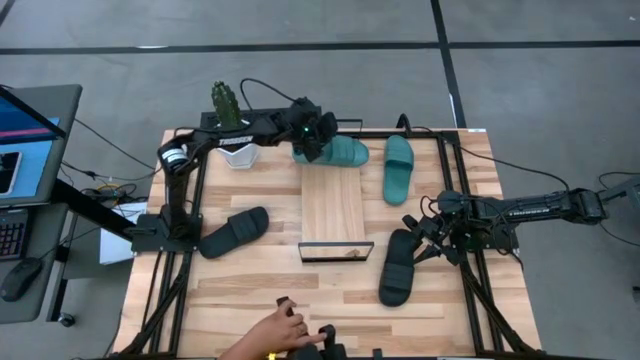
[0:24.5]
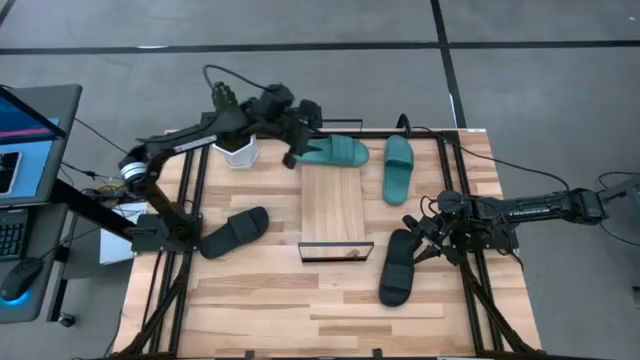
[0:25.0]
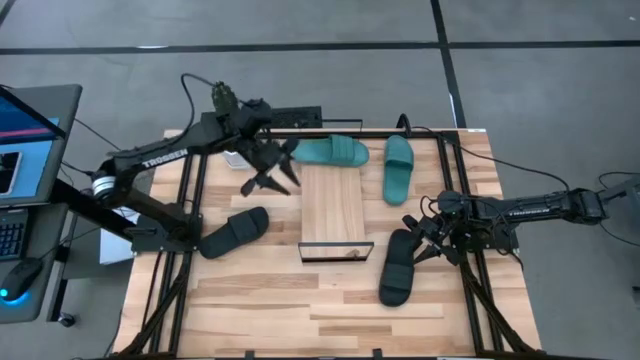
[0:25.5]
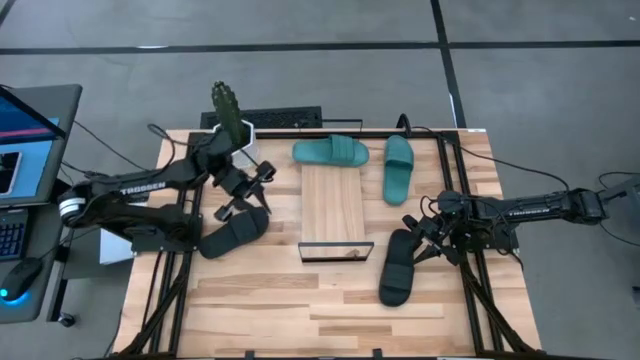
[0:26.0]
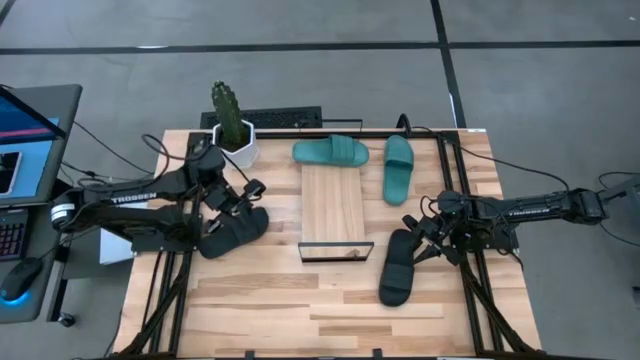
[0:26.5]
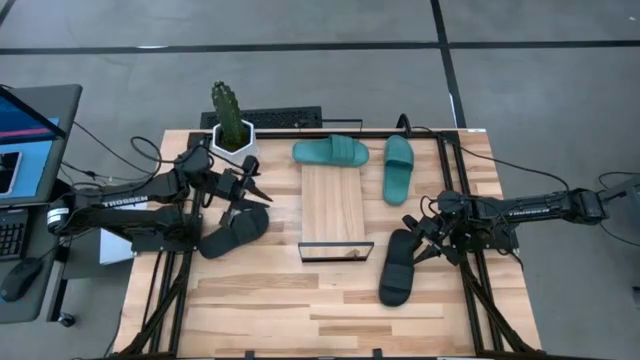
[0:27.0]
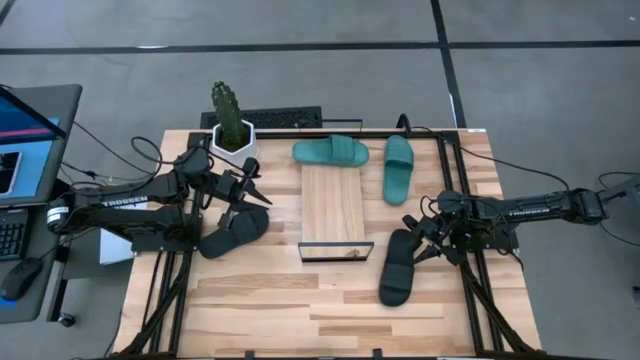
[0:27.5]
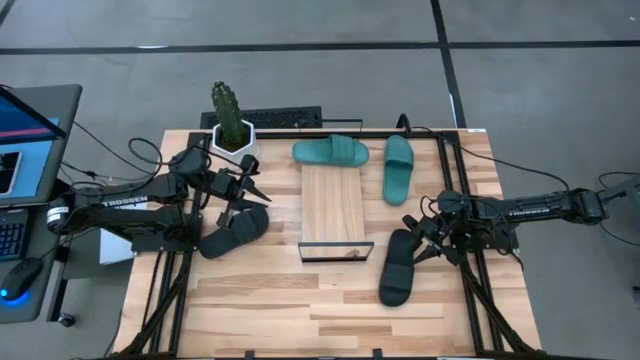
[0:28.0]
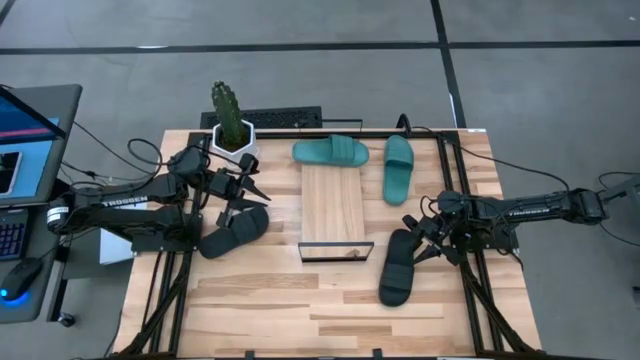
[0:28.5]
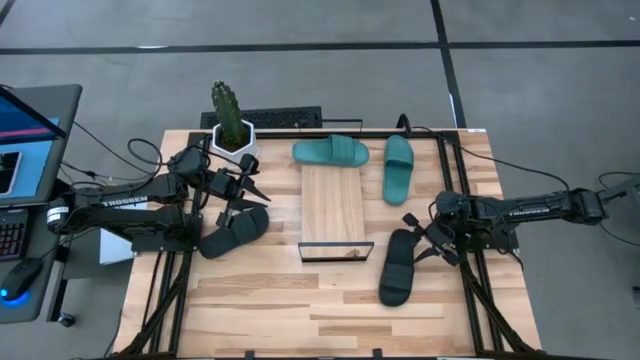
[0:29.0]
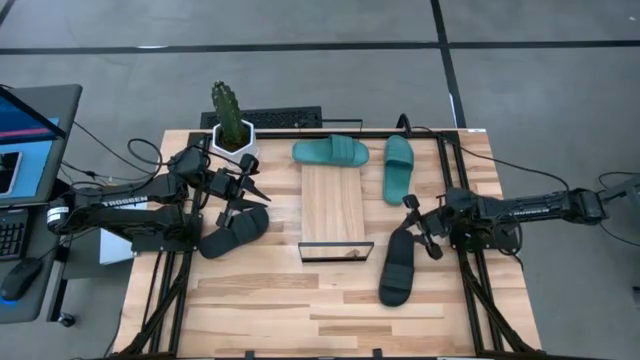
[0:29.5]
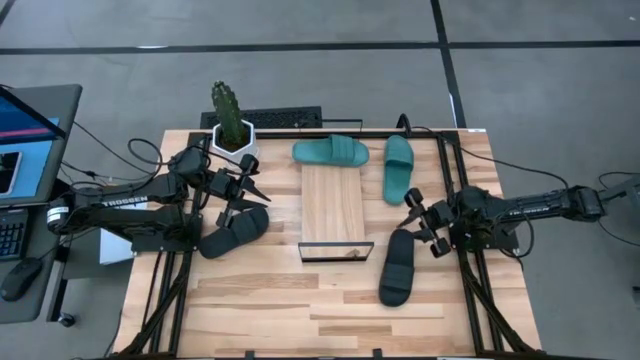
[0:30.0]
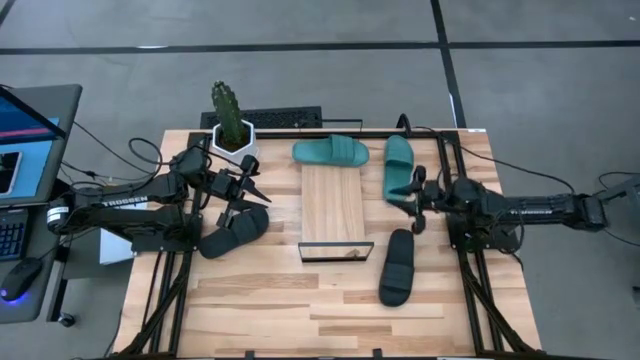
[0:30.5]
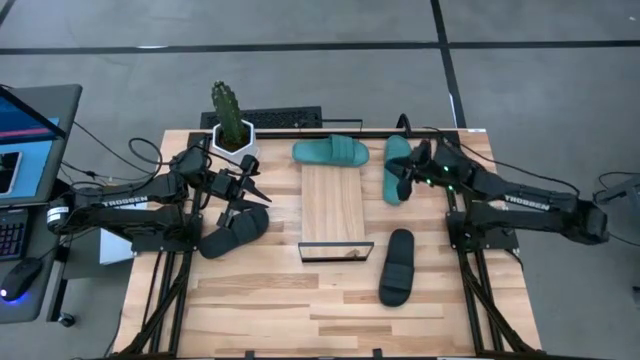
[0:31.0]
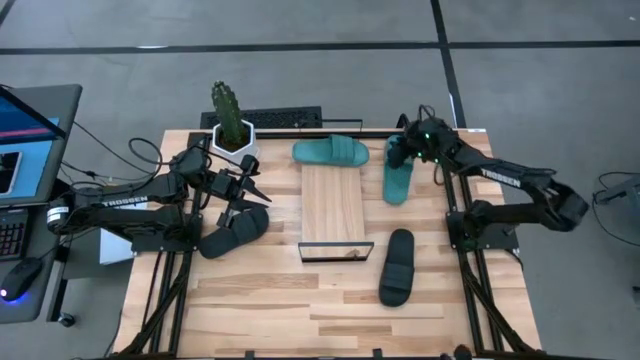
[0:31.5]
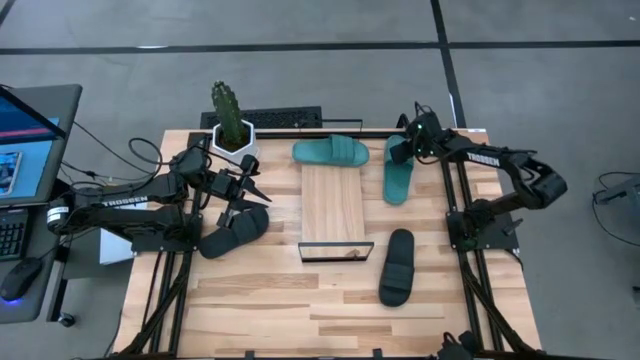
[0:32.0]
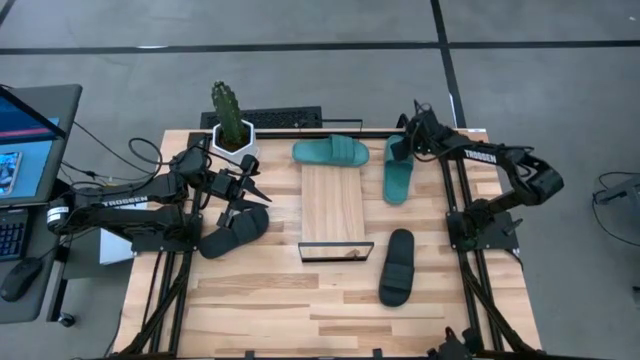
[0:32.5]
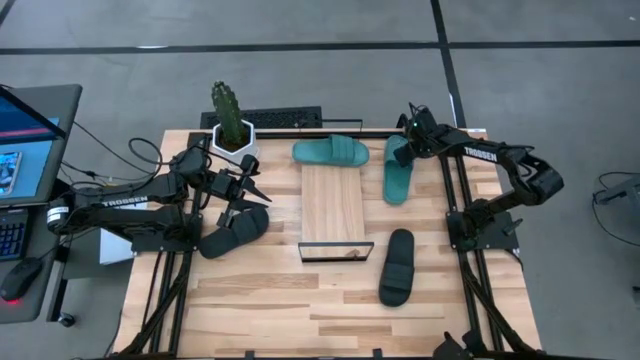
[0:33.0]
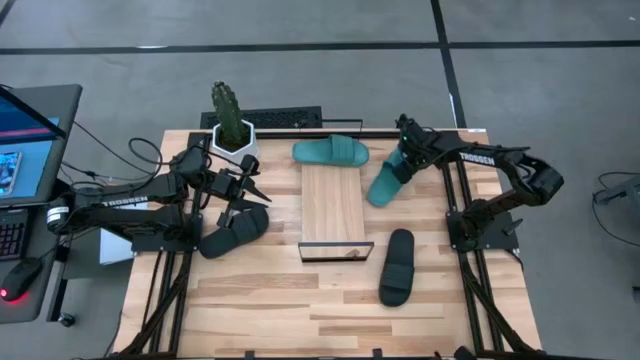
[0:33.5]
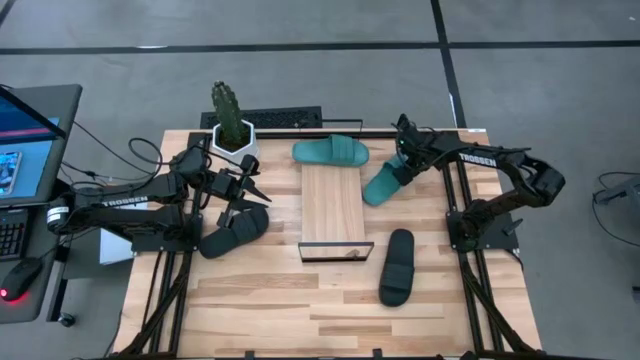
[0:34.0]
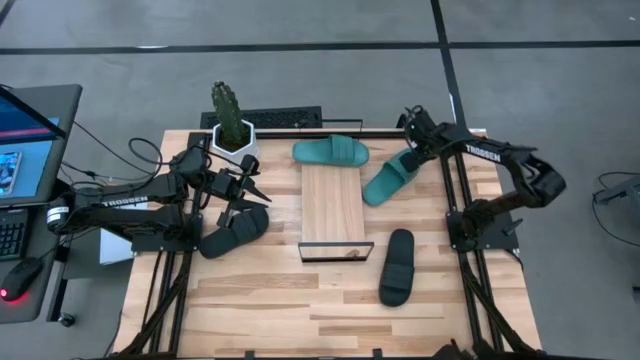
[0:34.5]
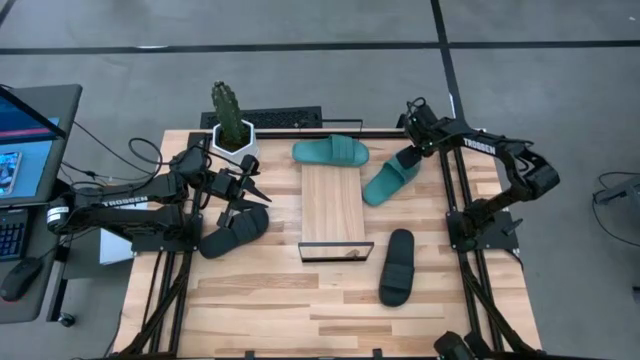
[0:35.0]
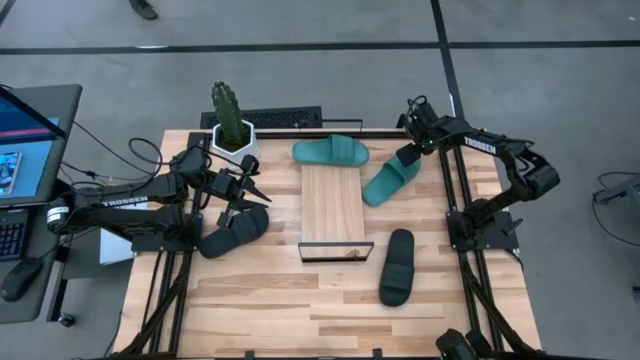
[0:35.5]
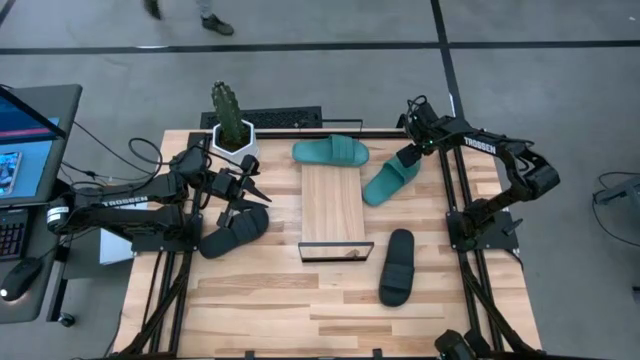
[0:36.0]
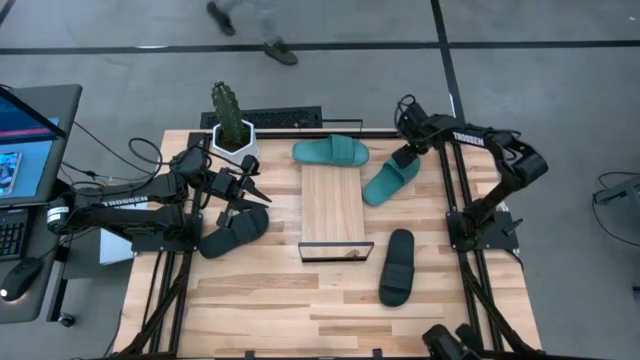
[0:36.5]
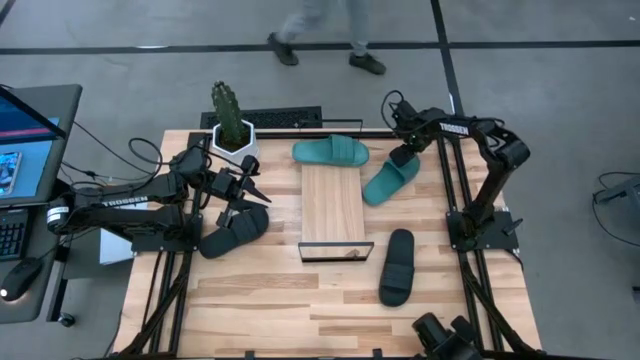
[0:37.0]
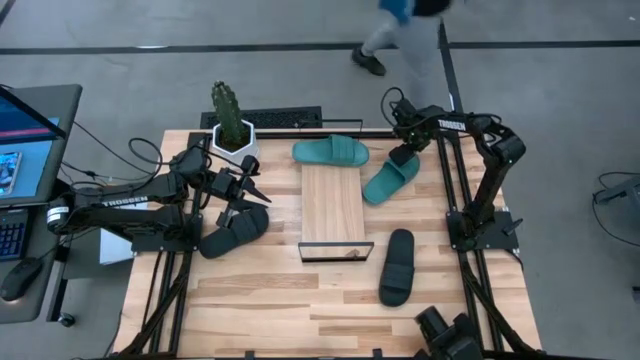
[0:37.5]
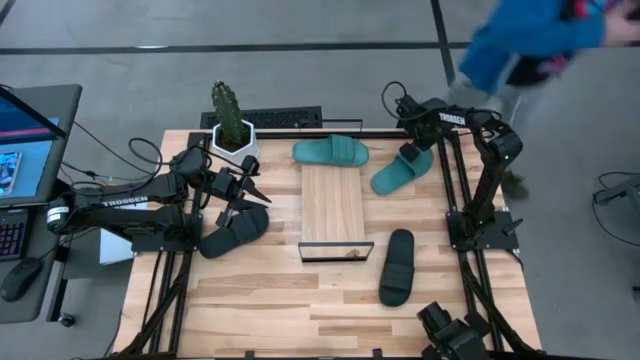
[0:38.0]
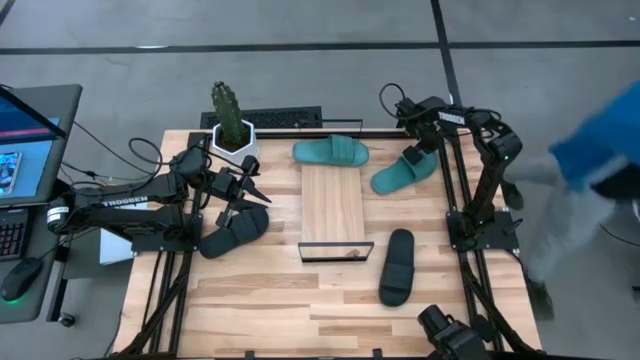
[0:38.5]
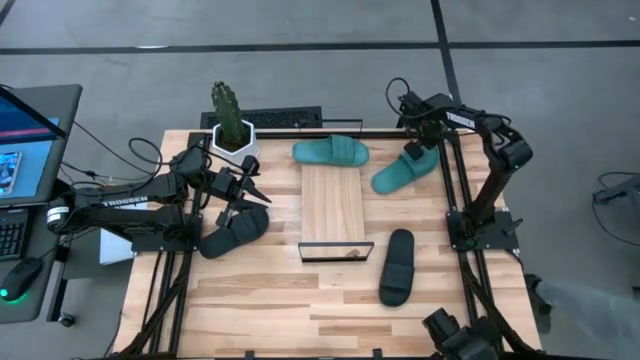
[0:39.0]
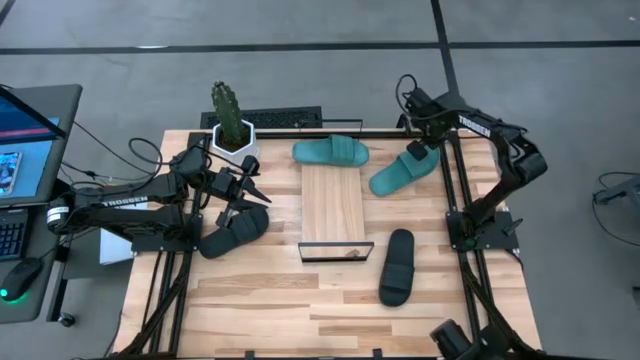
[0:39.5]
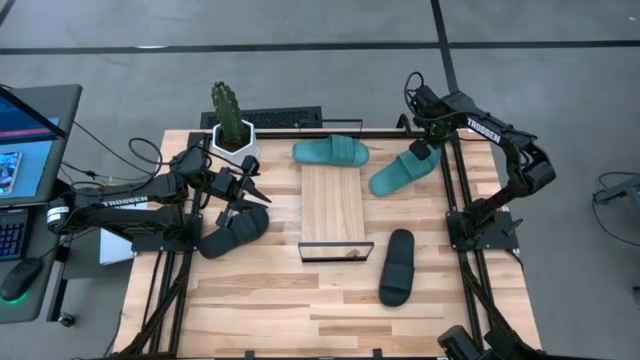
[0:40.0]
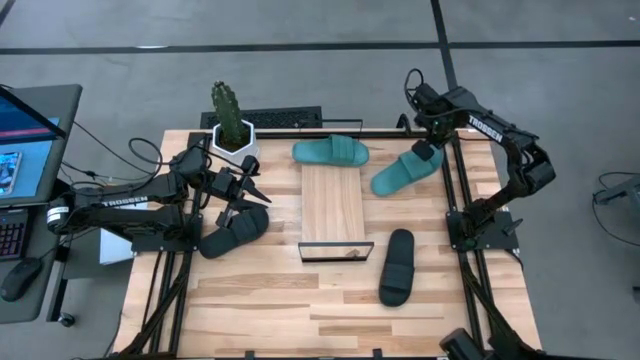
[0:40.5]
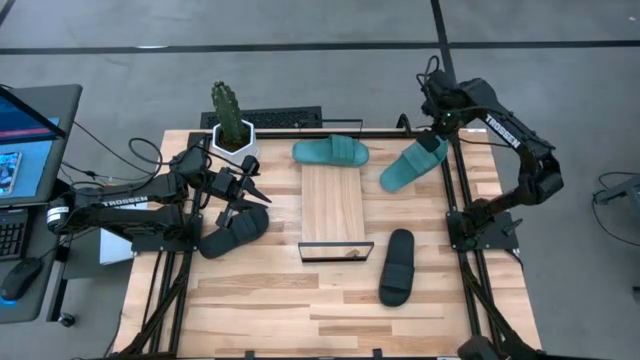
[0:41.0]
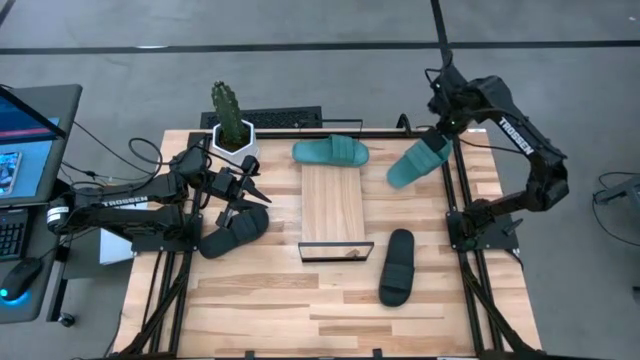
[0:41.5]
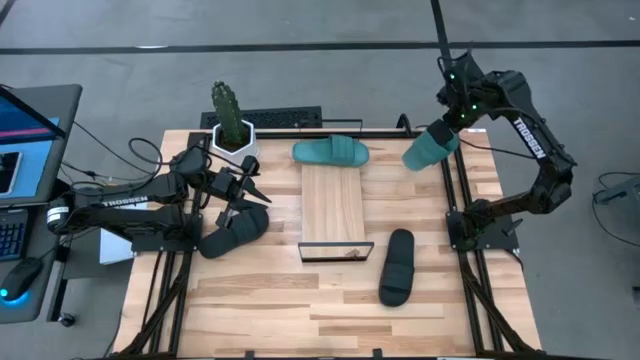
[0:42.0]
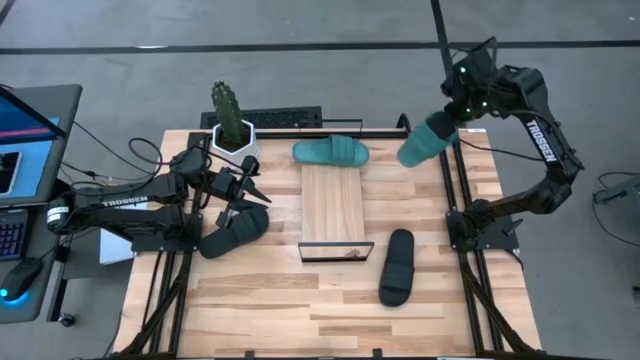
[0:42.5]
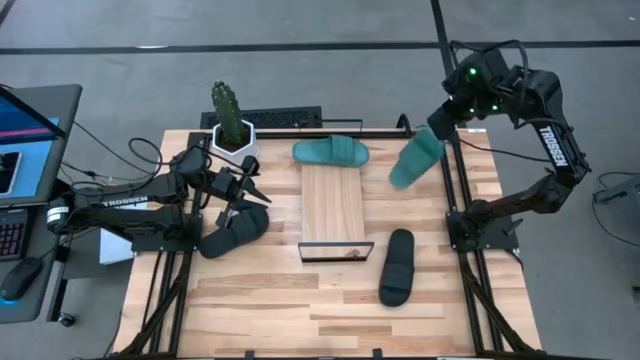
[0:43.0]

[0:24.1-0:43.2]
Task: Pick and place slides into the shelf
Put the green slide on the shelf
